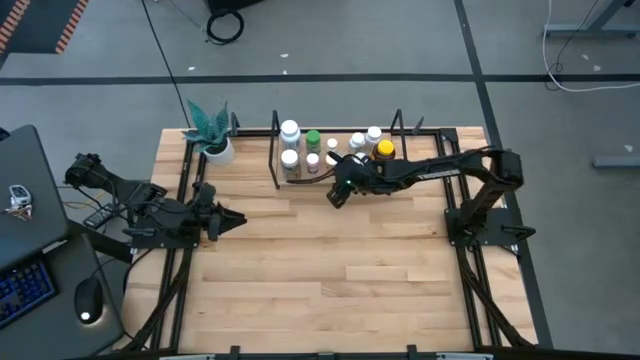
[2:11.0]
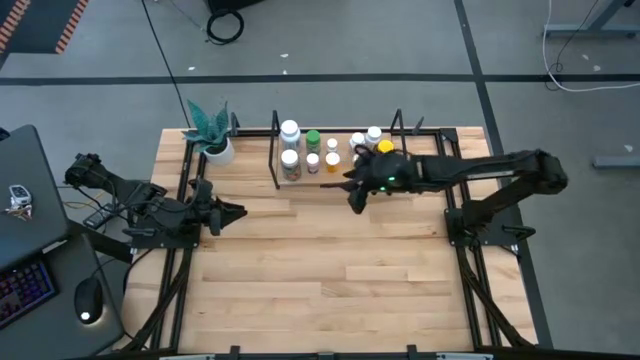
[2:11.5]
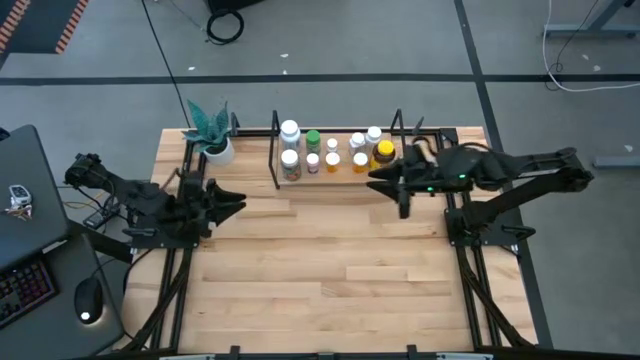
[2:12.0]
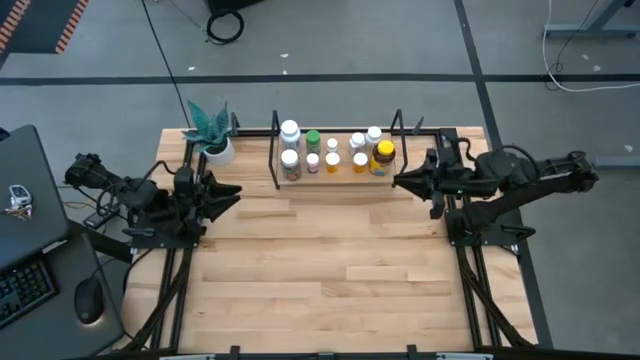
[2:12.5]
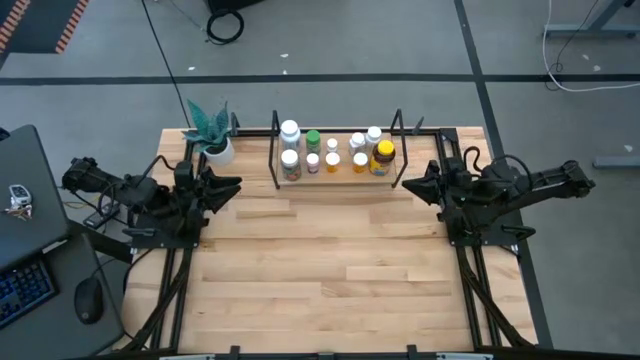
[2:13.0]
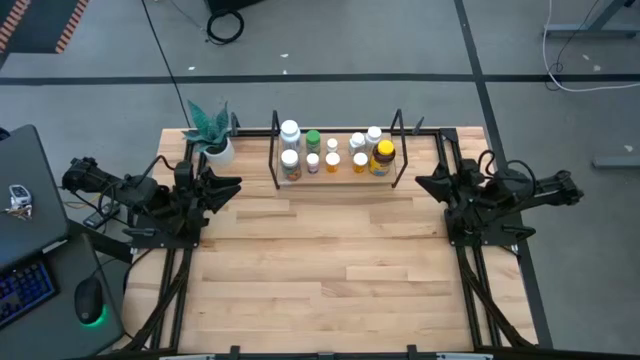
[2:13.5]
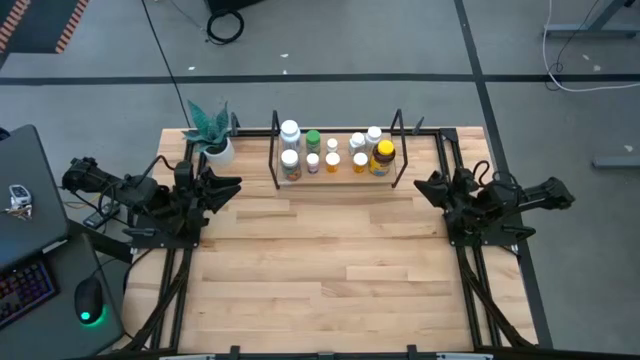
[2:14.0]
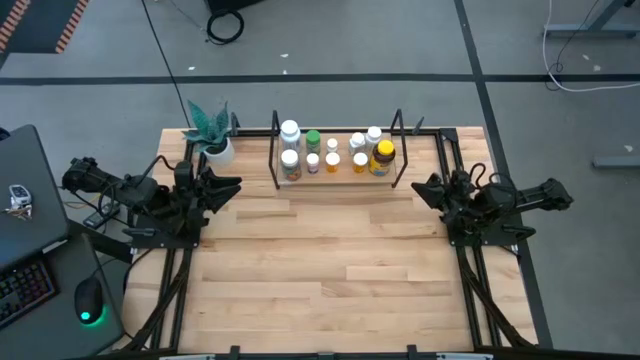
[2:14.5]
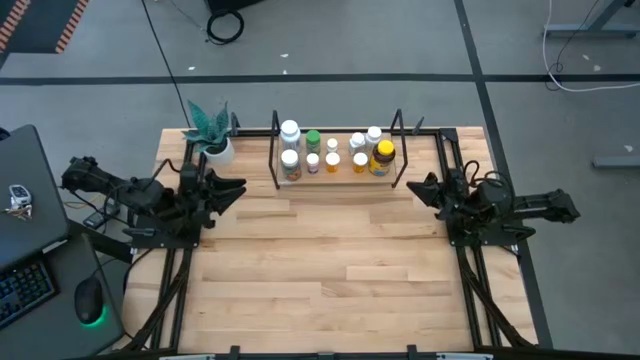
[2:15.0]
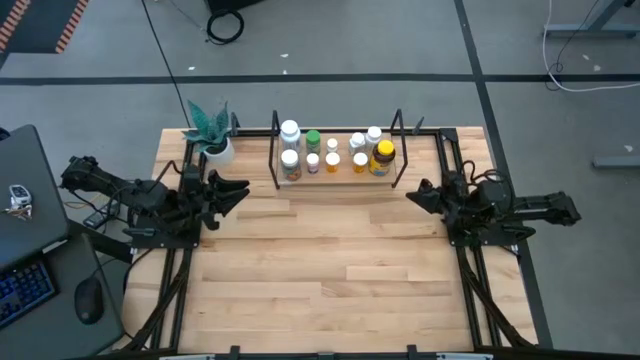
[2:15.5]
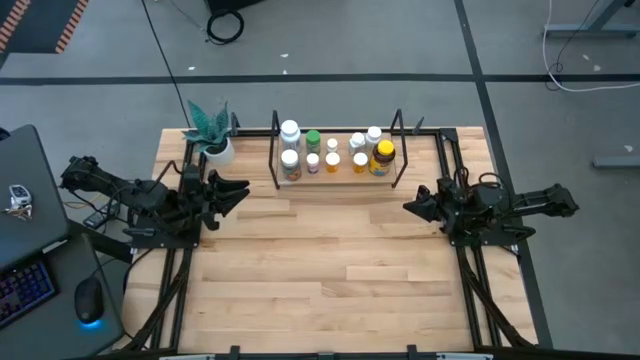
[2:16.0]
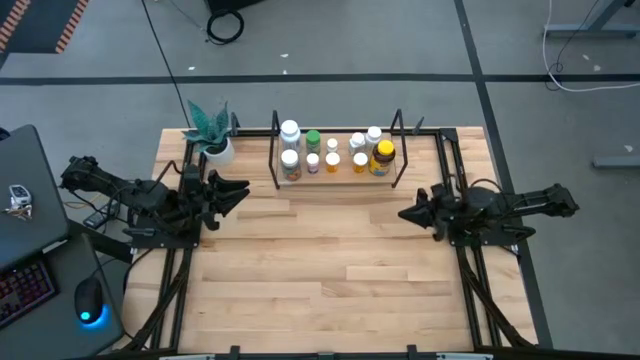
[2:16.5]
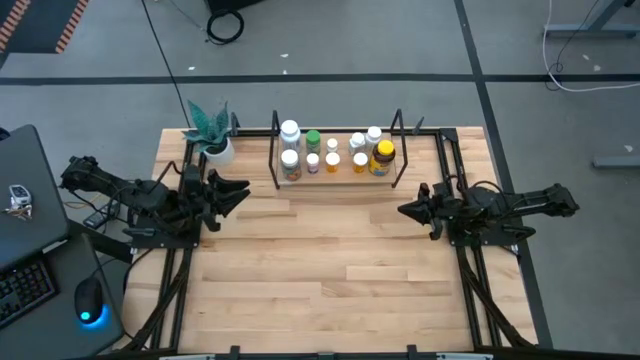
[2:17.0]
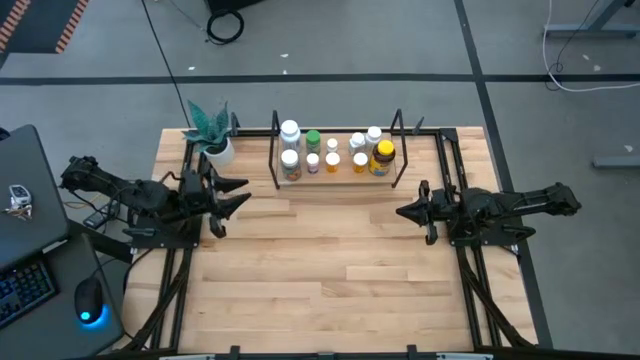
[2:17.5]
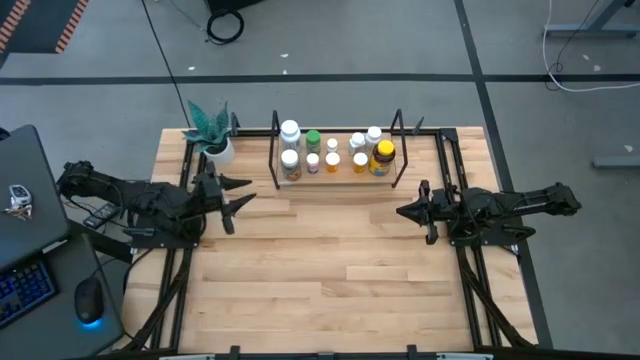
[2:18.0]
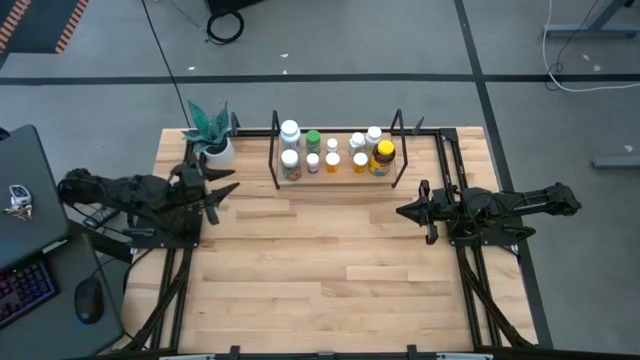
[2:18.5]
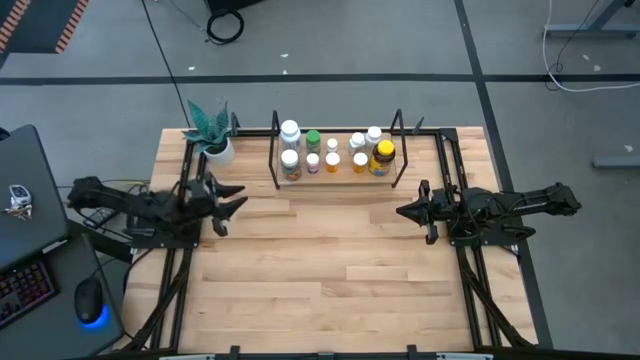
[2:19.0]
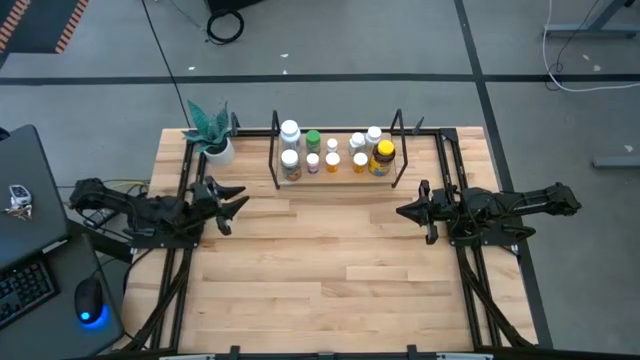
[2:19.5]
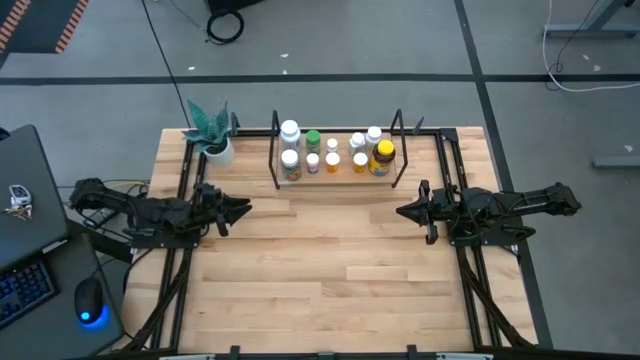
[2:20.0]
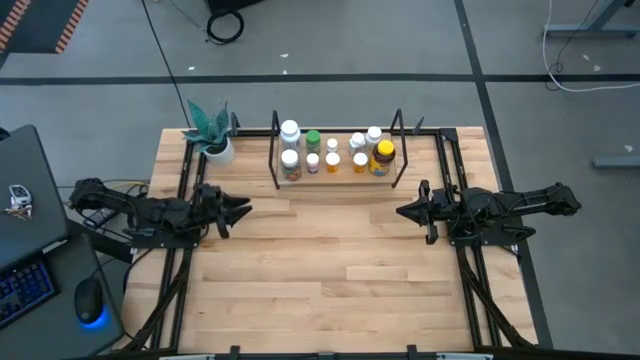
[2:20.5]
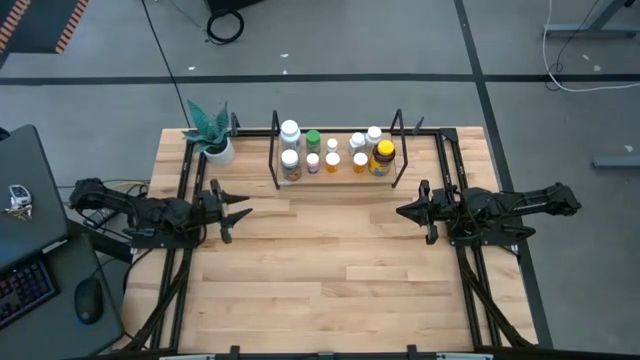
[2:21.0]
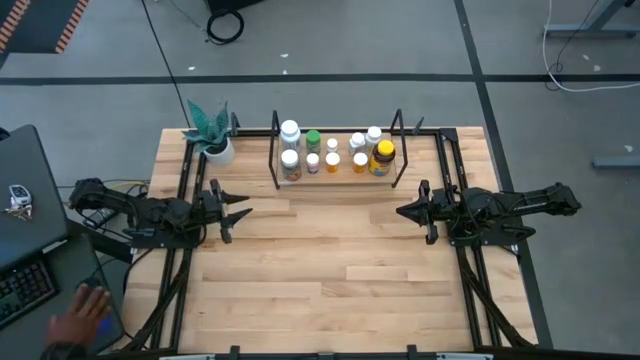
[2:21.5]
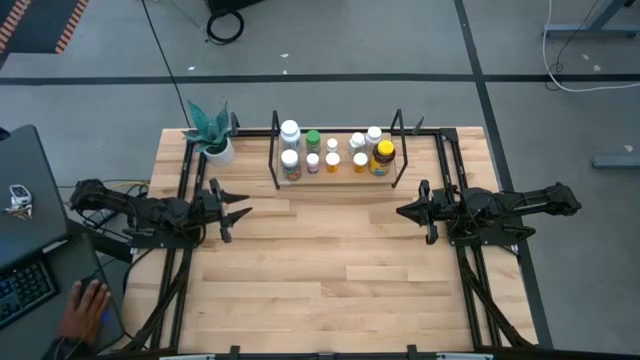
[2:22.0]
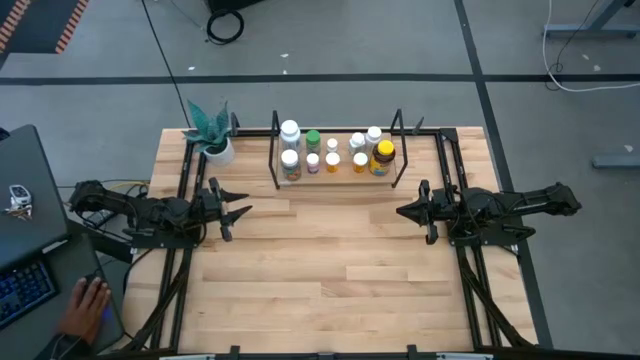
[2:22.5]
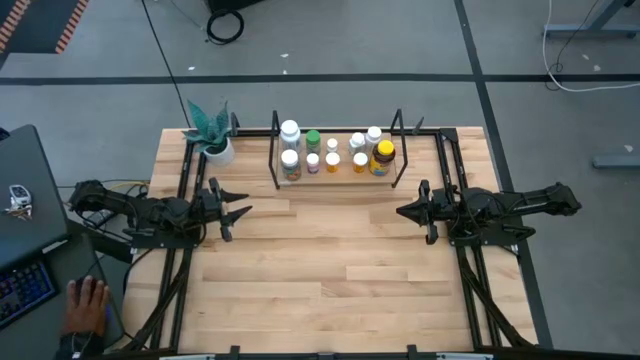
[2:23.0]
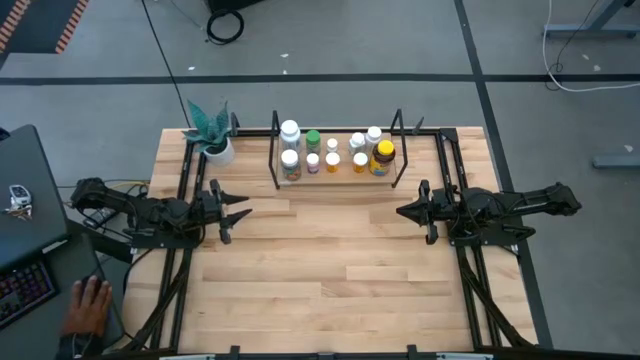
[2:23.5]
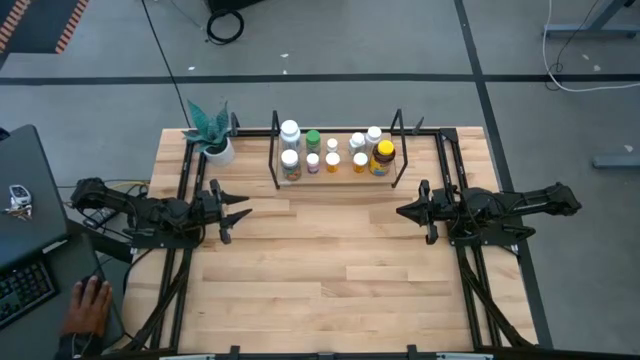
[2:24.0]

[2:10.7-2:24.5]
Task: Pick and place medicine bottles onto shelf by color
Return to Home Position

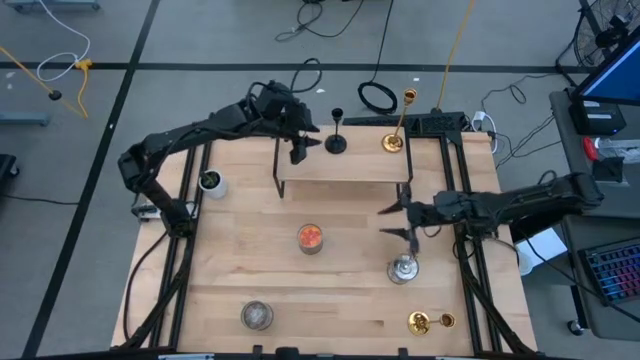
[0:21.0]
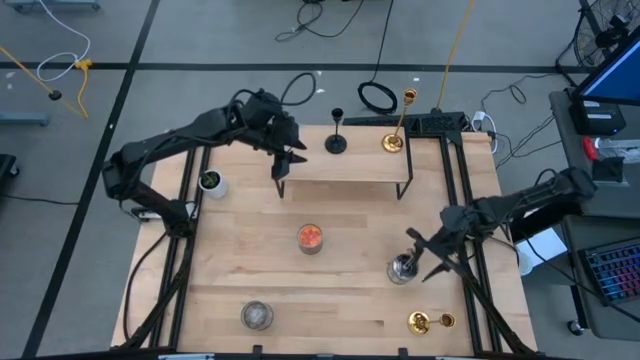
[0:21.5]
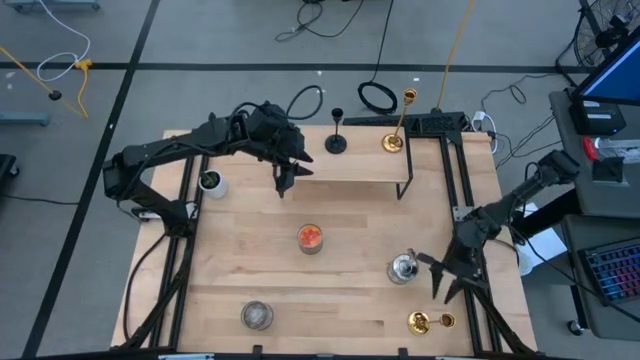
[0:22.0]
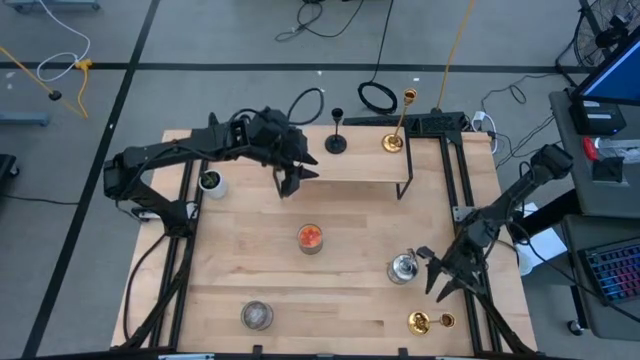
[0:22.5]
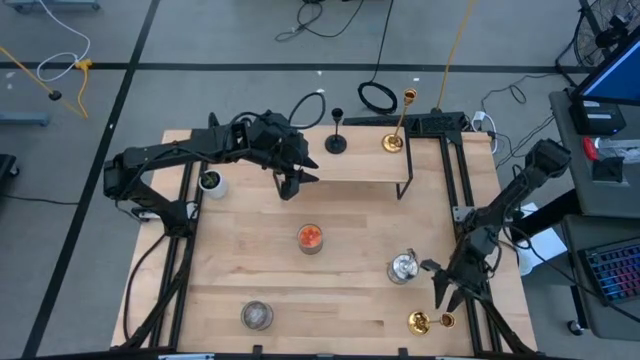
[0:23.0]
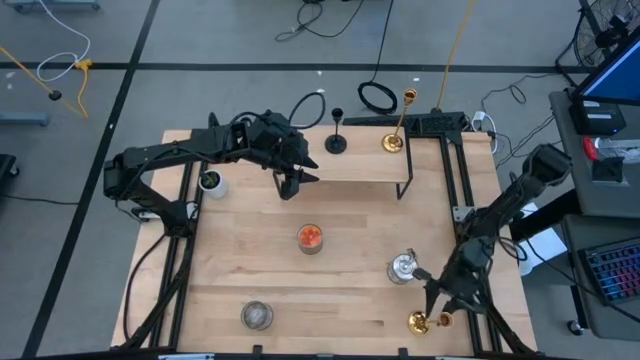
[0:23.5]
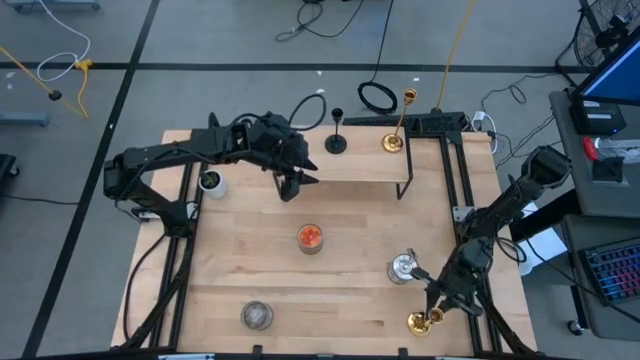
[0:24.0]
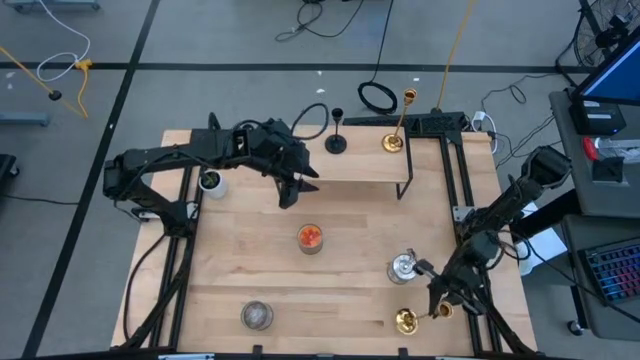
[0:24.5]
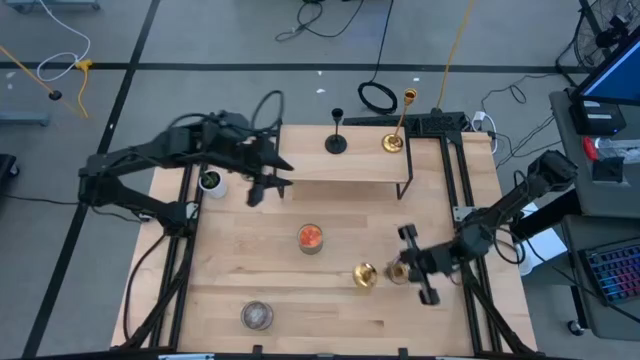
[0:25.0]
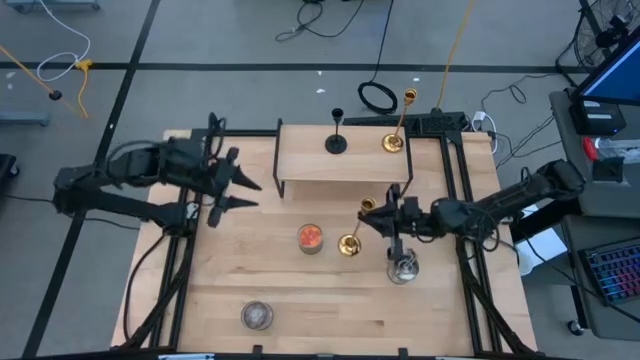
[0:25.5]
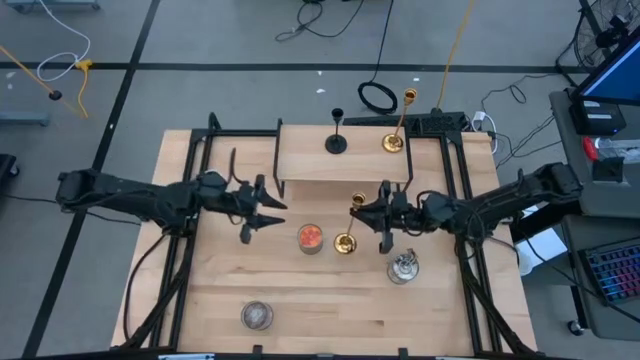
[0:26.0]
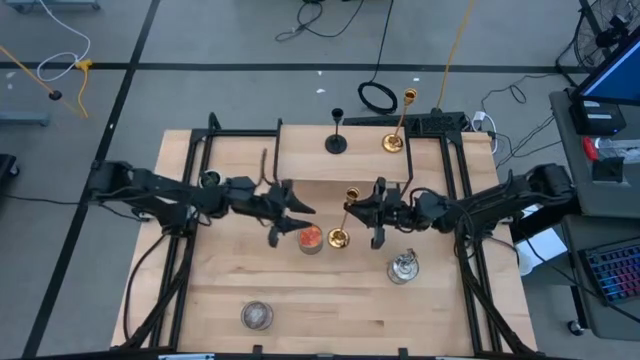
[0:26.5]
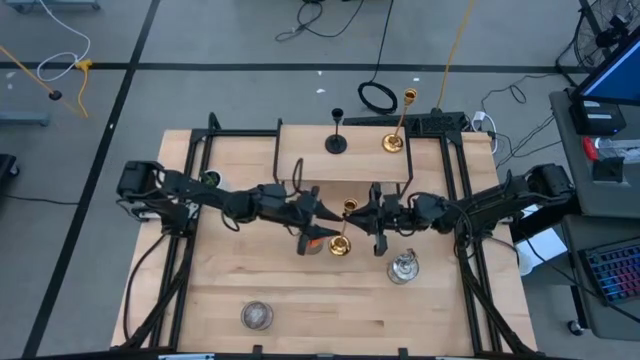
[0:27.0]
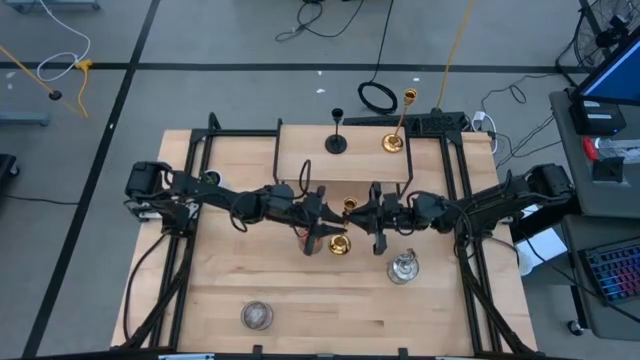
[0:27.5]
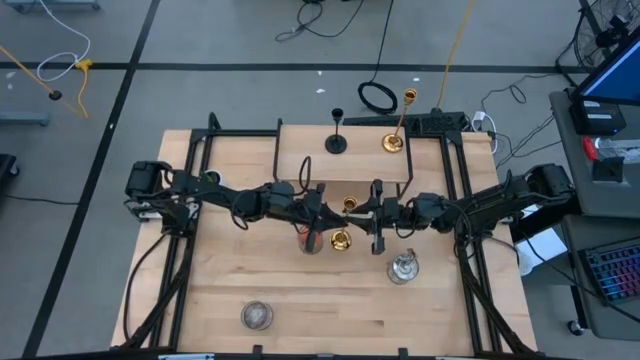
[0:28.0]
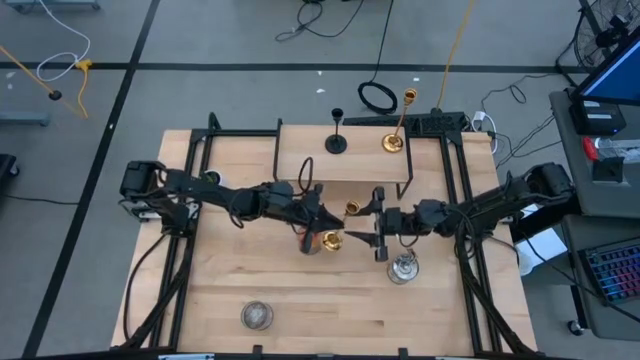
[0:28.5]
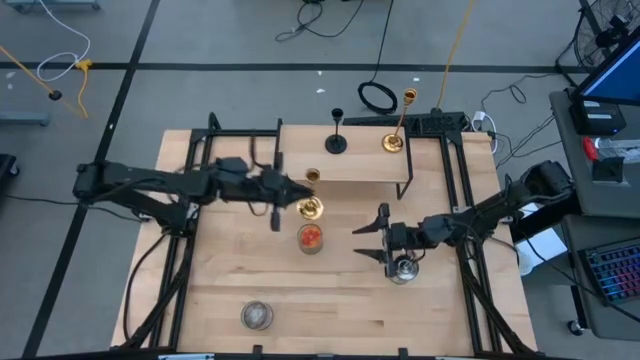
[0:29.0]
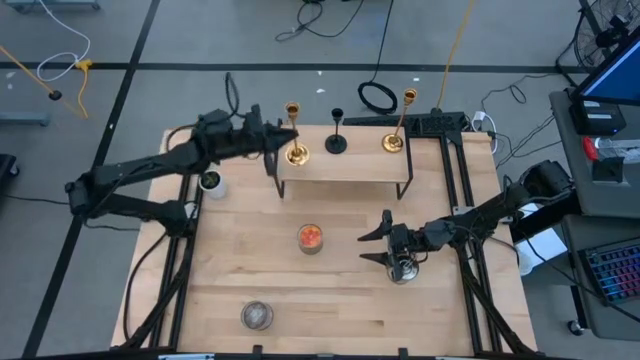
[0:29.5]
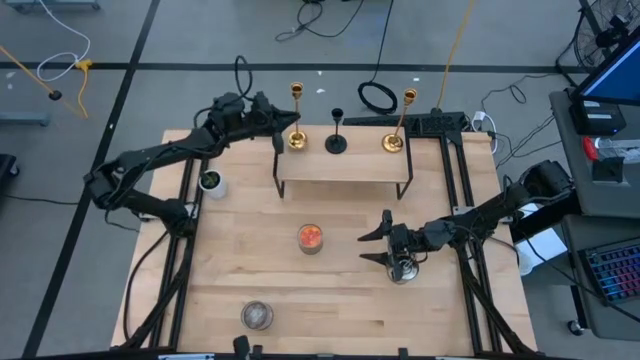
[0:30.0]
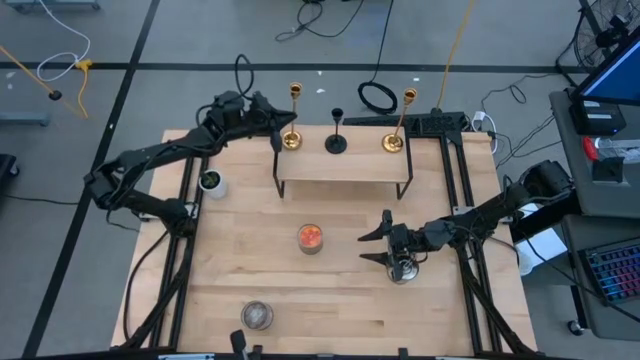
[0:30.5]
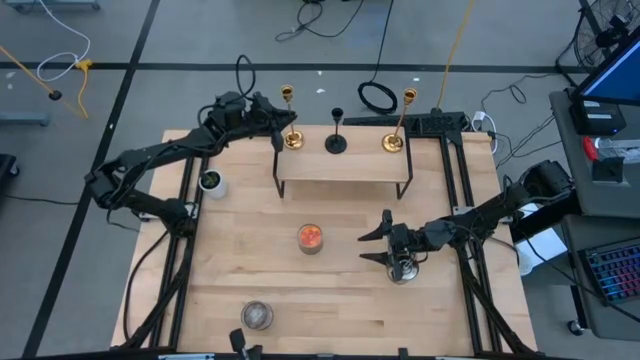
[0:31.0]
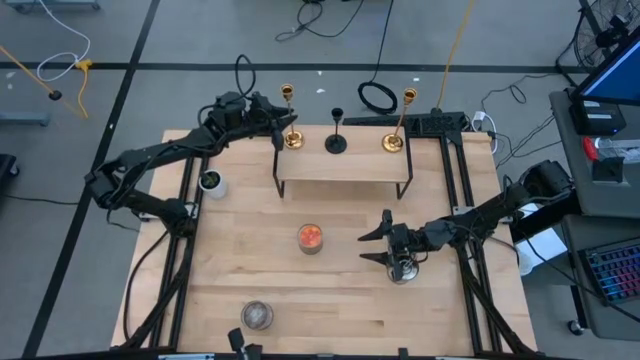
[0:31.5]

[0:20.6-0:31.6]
Task: Pick & Place candle stick holders
Put the golden candle holder on the shelf
